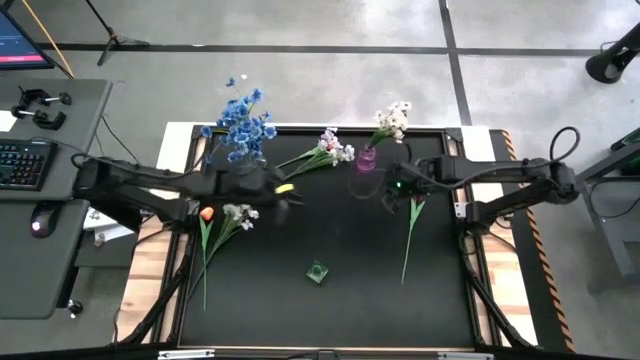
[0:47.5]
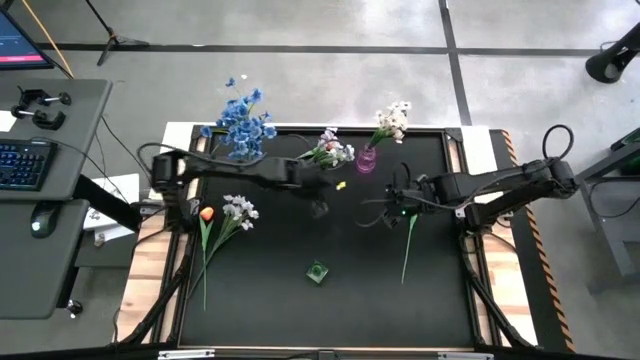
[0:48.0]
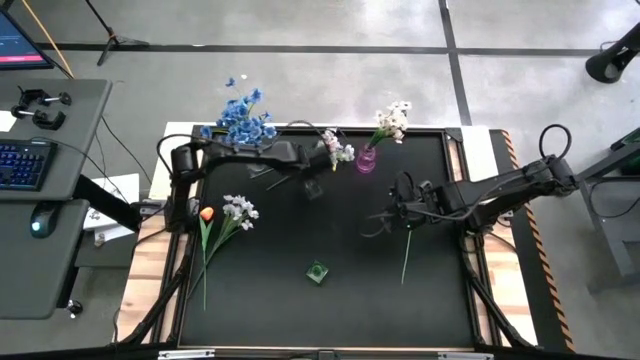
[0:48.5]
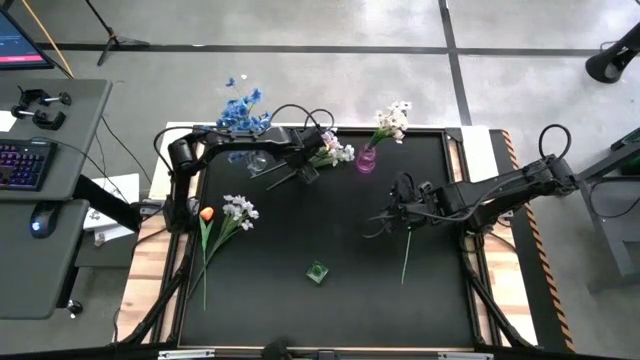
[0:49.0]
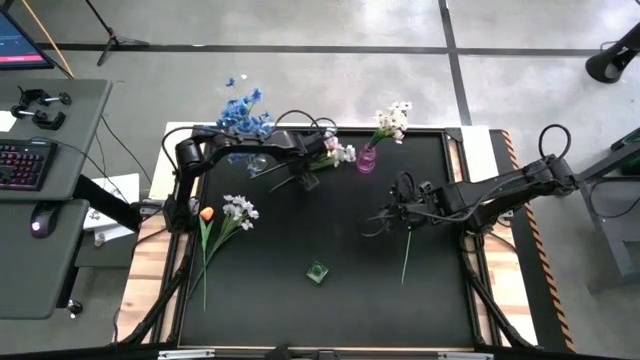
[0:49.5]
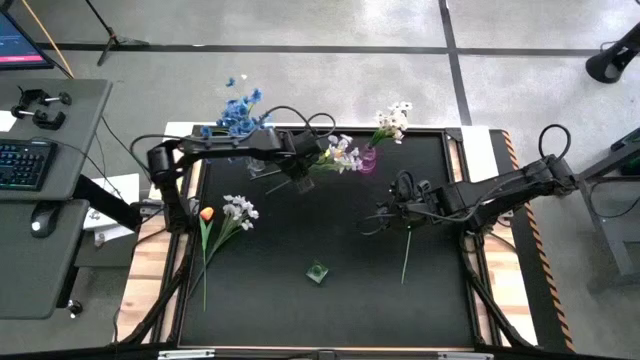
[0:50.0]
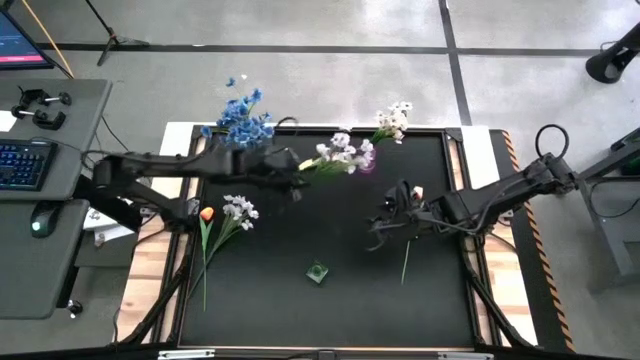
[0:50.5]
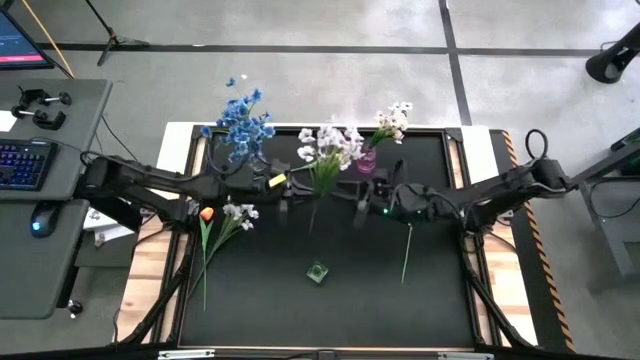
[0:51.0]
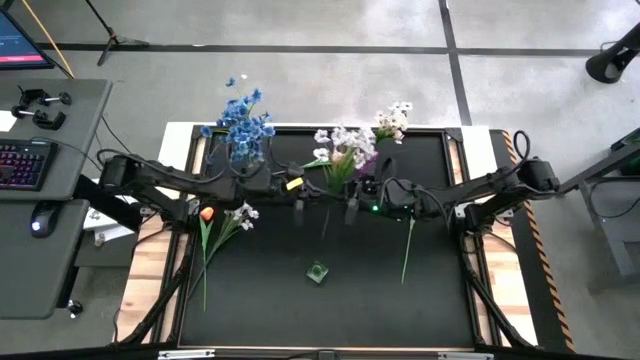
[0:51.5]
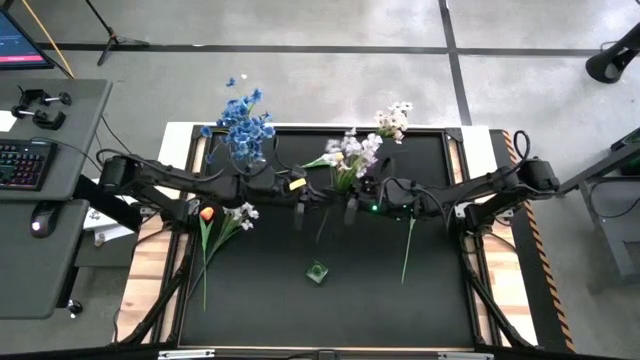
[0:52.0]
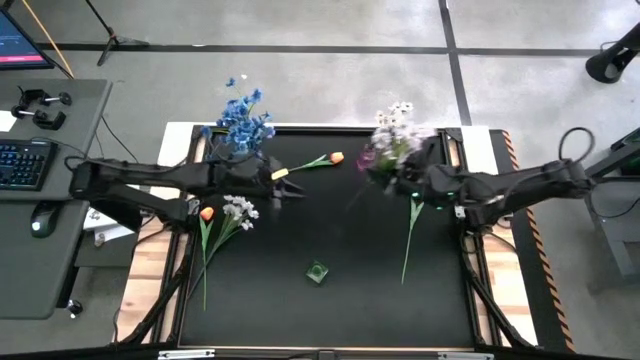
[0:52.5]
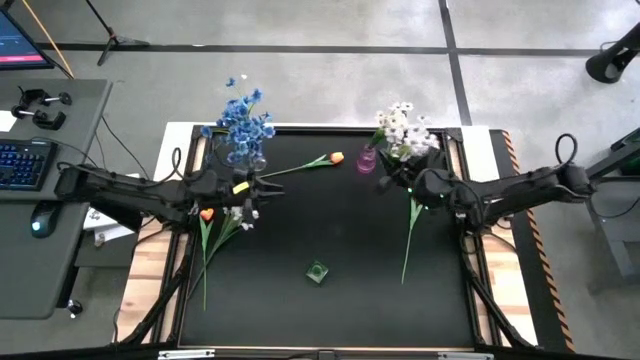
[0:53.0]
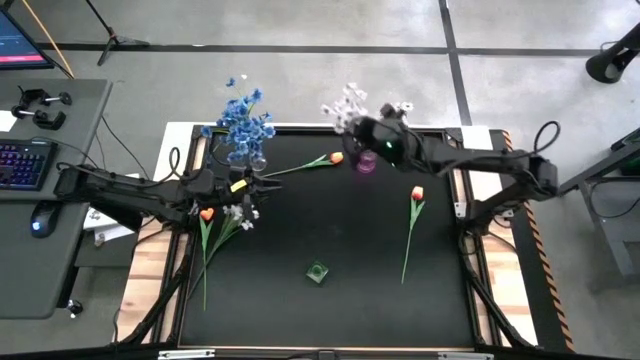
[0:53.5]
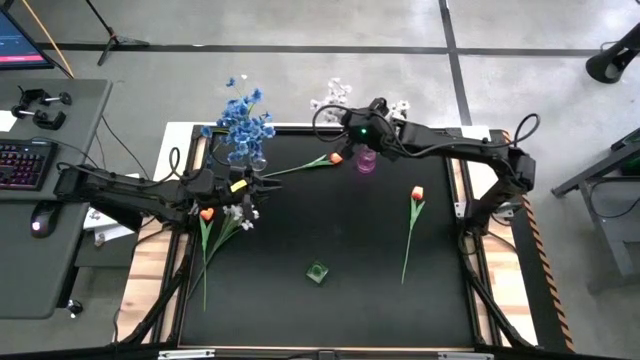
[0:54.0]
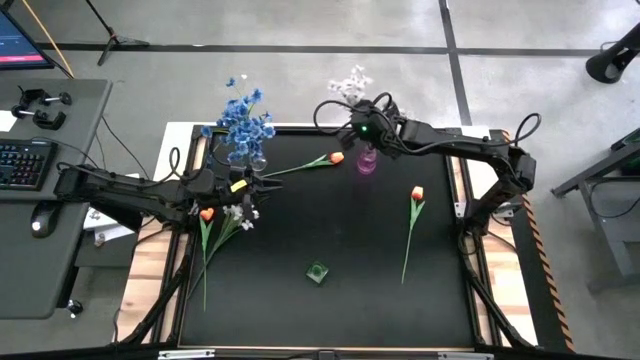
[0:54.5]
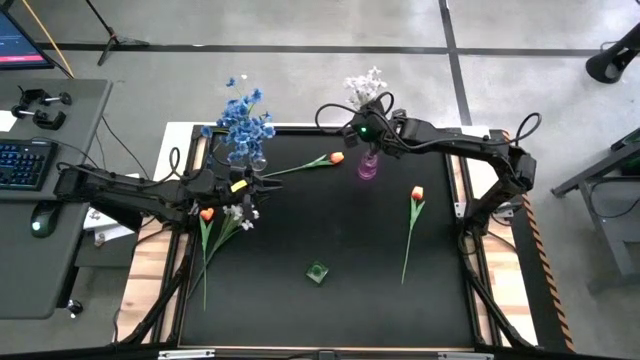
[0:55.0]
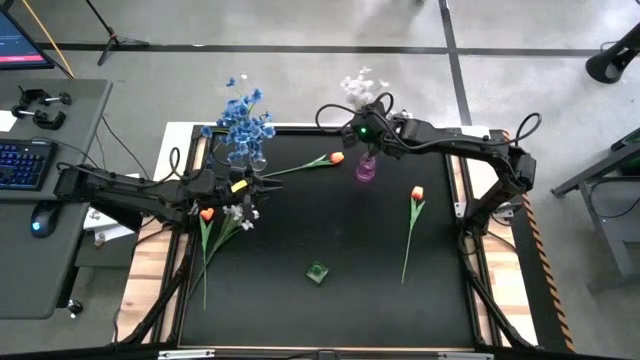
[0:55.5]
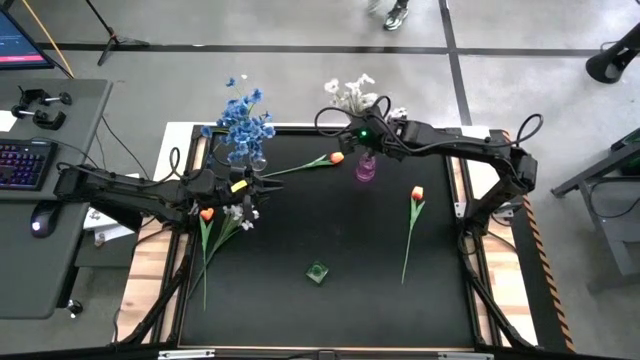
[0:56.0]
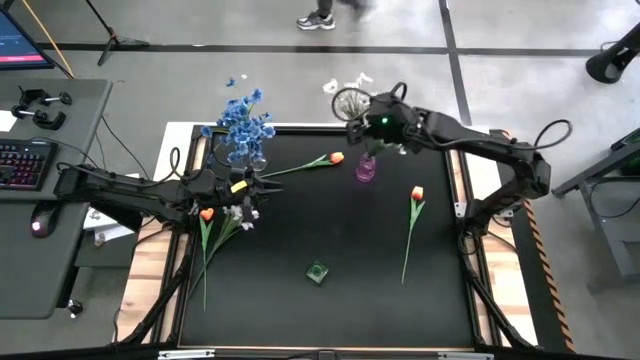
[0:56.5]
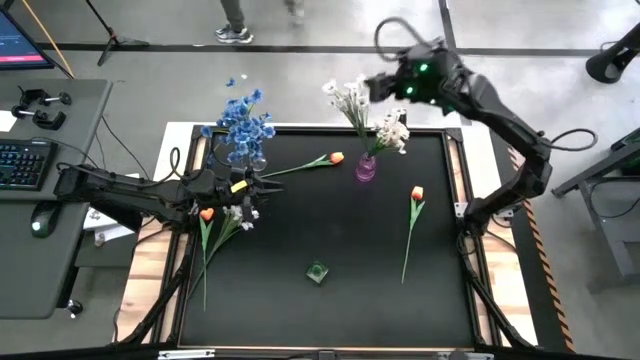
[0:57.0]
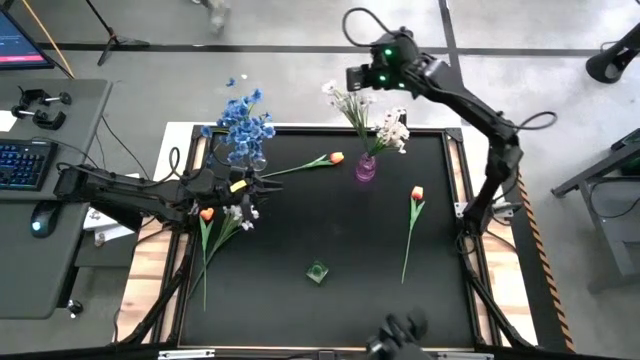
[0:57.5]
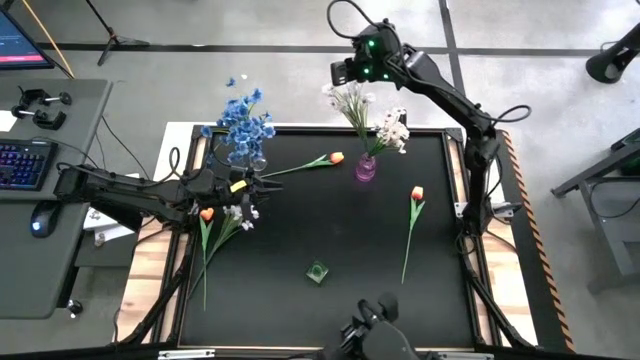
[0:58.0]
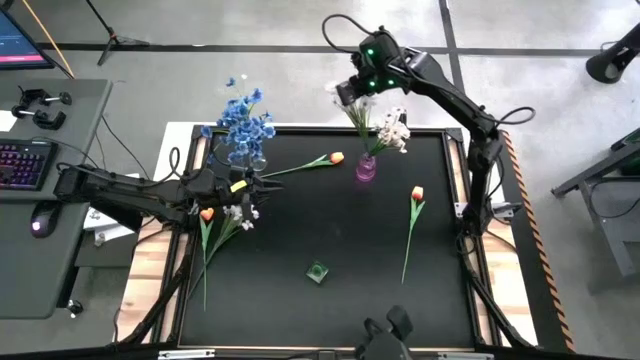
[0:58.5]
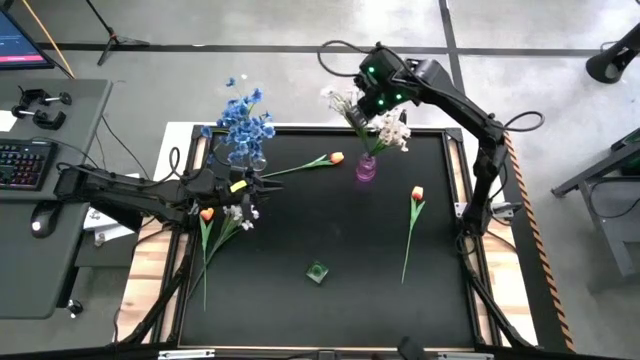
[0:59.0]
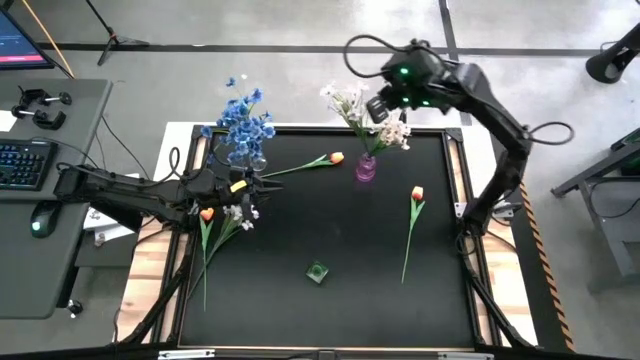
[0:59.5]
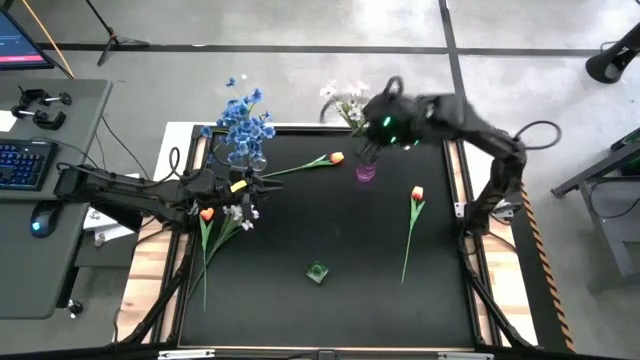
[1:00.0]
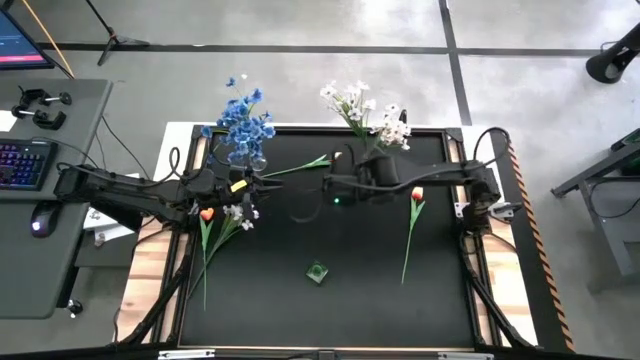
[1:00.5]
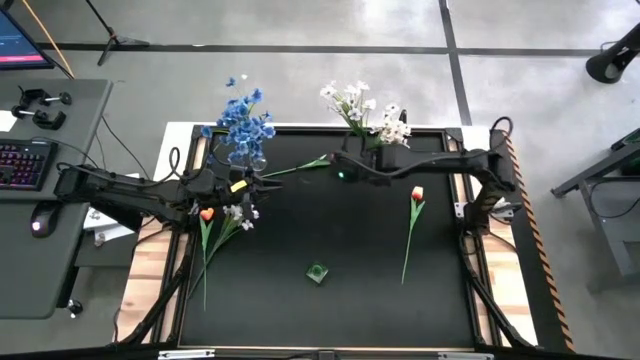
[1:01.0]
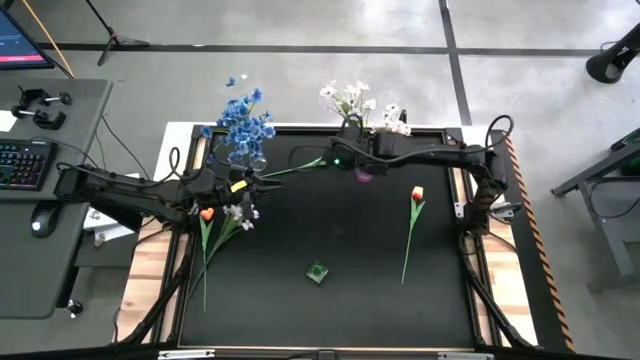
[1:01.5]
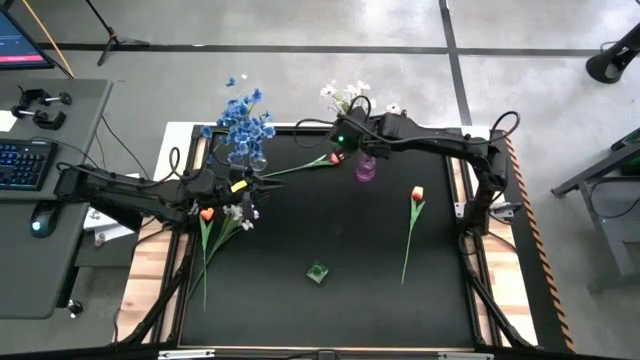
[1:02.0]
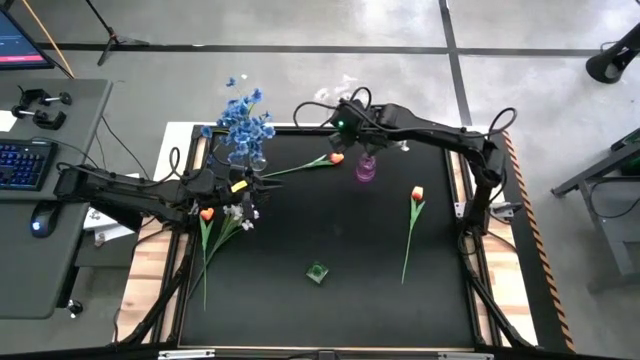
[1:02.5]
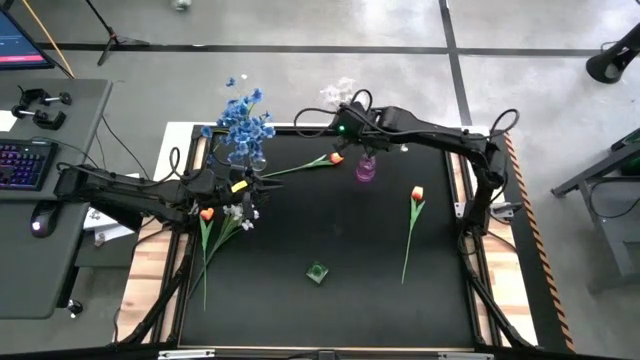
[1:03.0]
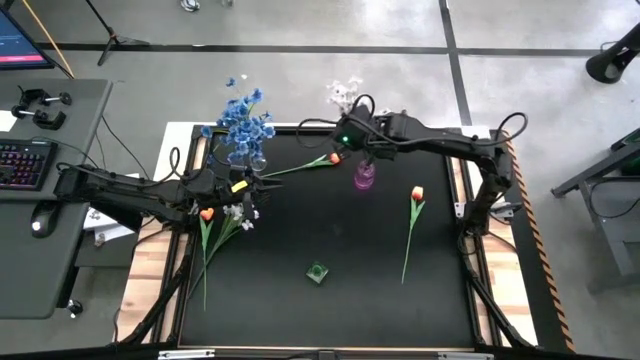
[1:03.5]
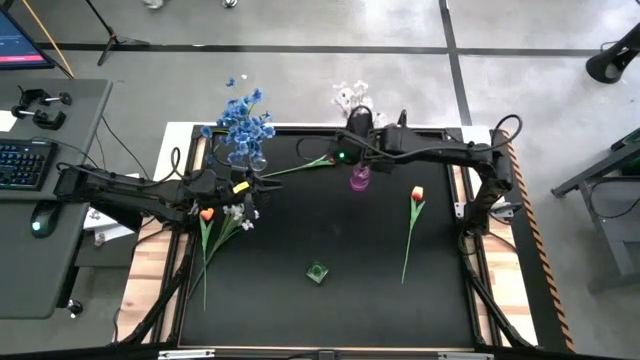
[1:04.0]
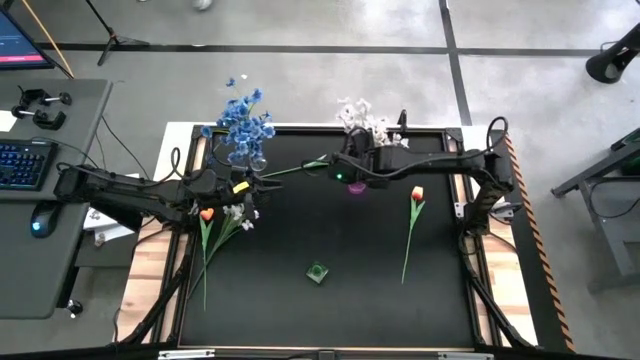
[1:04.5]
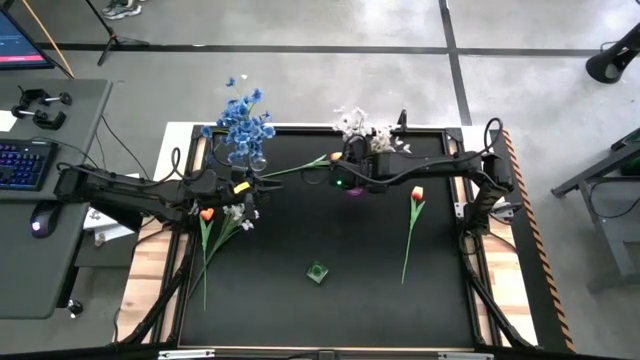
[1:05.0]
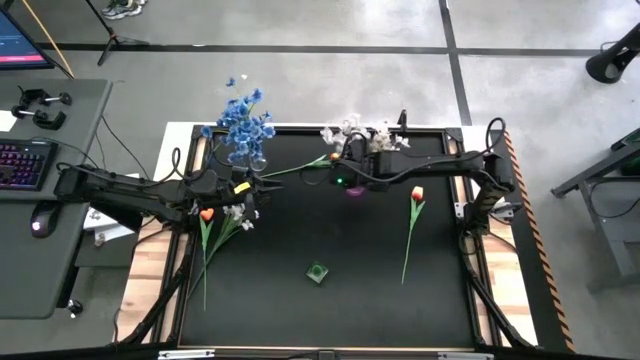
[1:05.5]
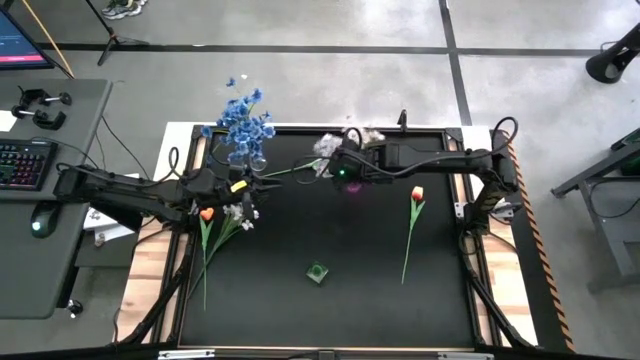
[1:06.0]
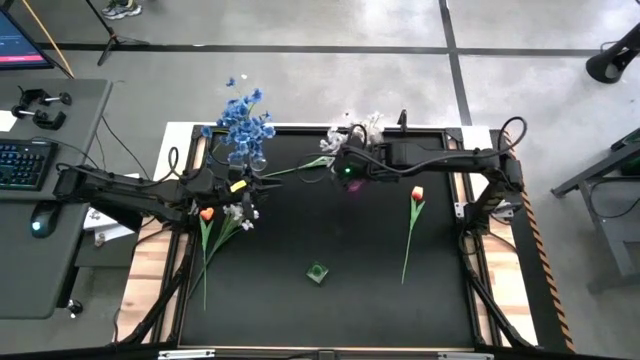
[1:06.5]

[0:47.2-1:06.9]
Task: Sort flowers into vase by color
Put the top white flowers into the pink vase

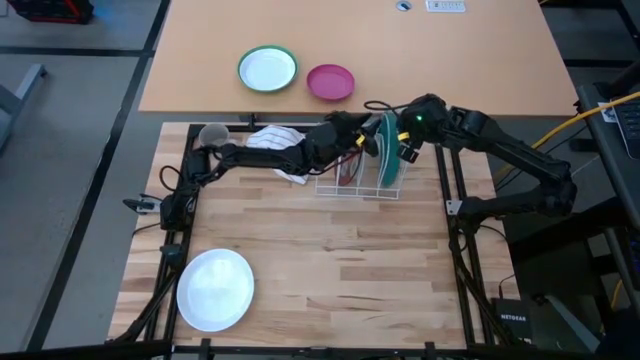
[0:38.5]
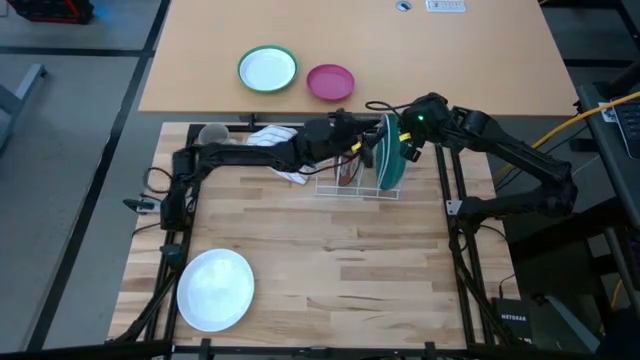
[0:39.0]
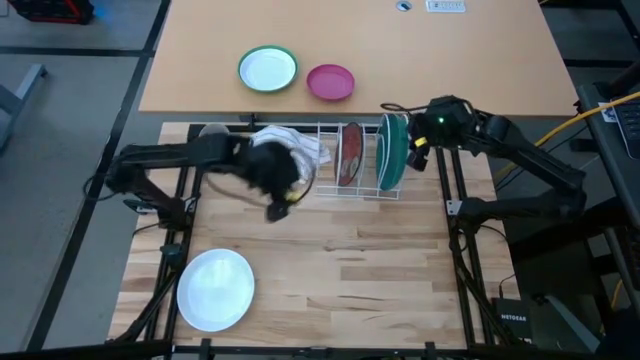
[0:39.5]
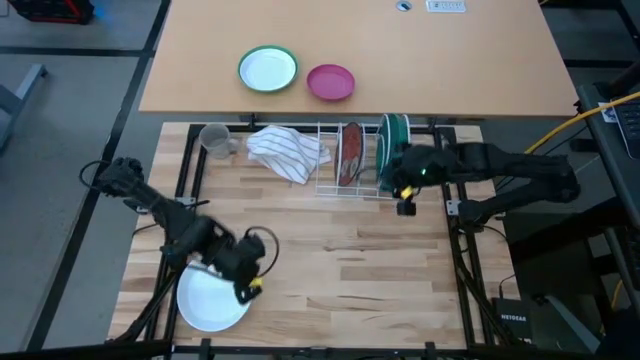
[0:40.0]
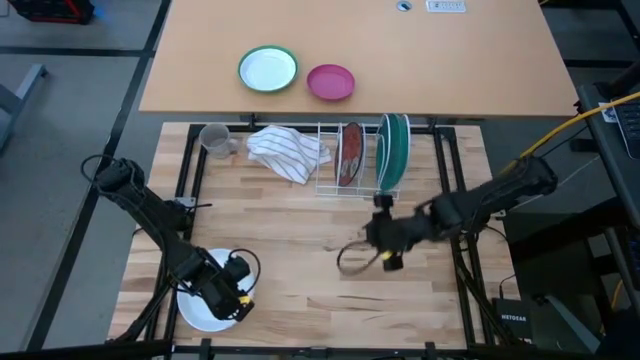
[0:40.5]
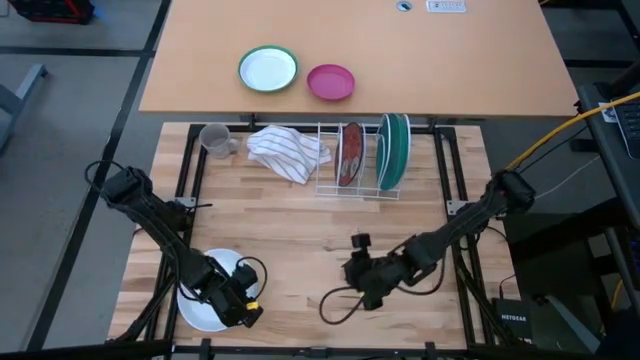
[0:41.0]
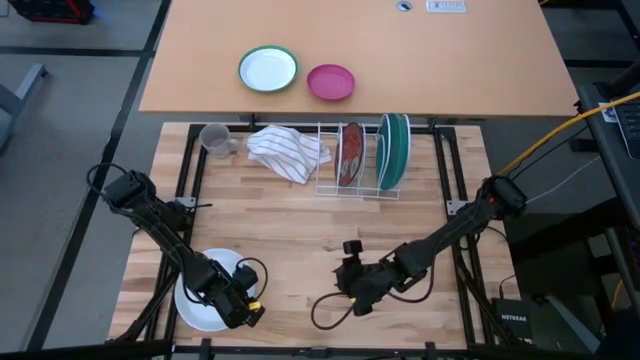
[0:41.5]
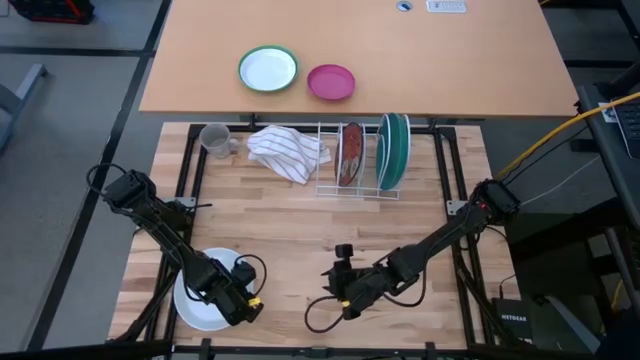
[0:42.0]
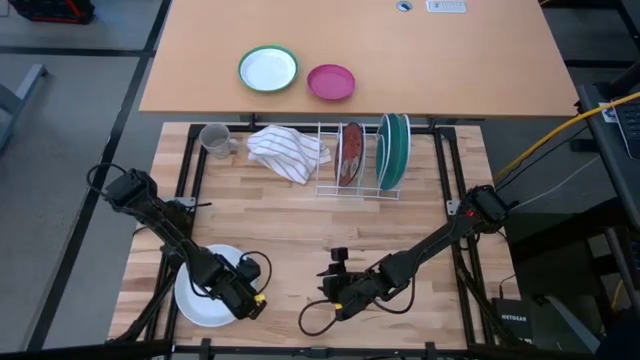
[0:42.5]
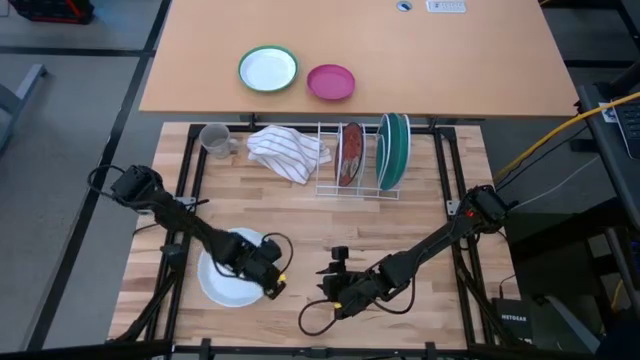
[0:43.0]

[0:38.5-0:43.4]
Task: Sort dishes
Put the white plate in the dish rack
